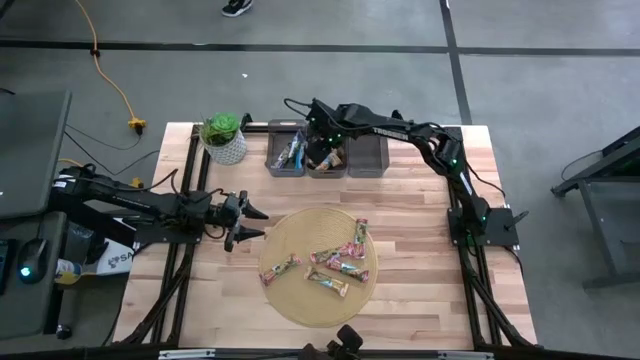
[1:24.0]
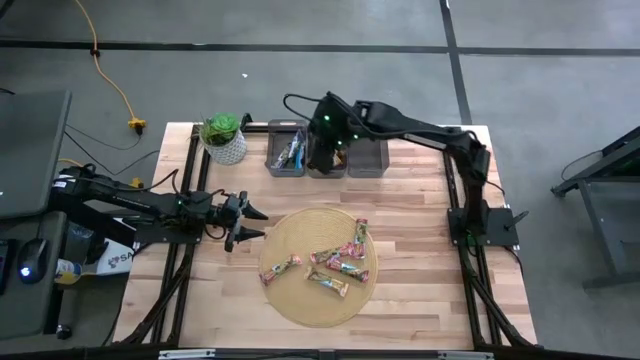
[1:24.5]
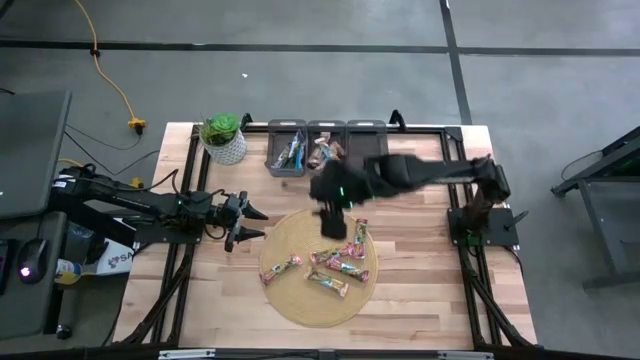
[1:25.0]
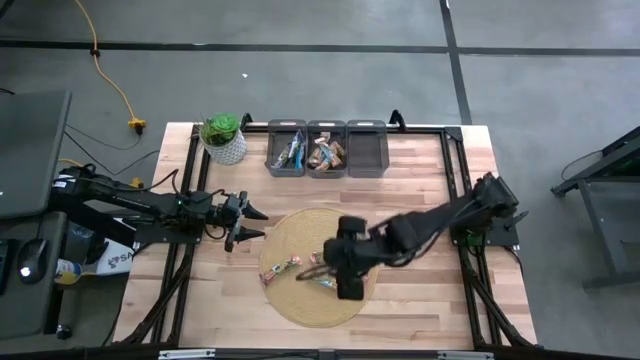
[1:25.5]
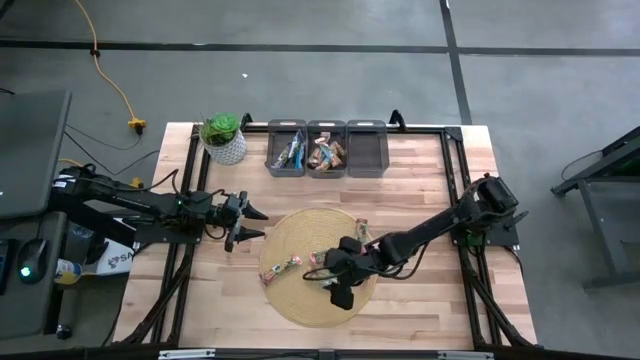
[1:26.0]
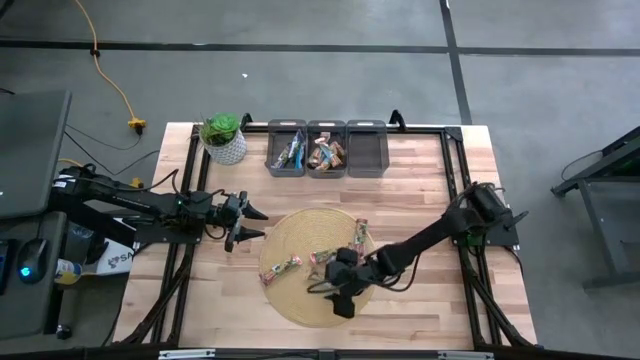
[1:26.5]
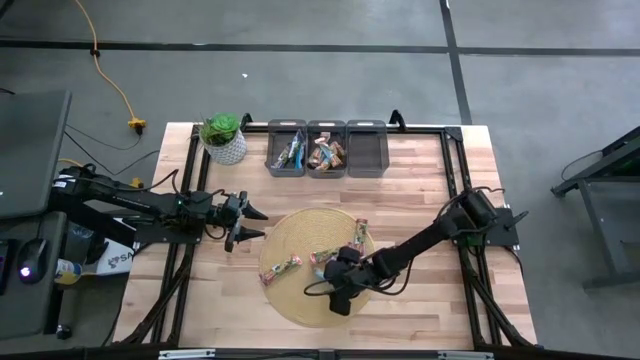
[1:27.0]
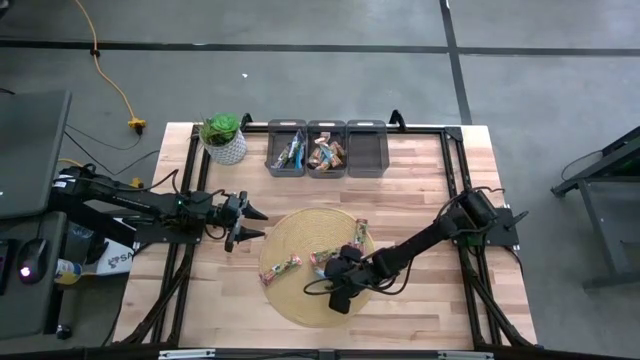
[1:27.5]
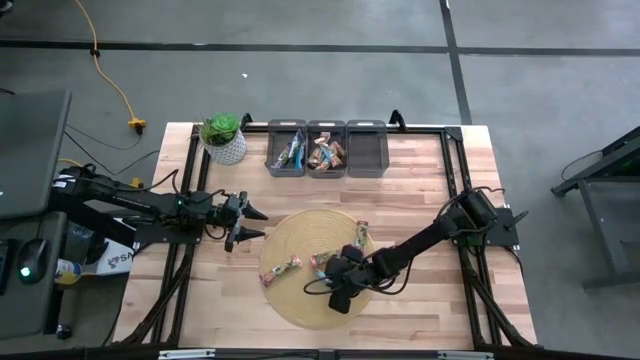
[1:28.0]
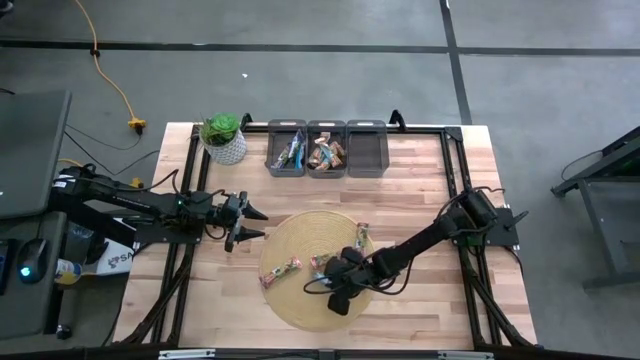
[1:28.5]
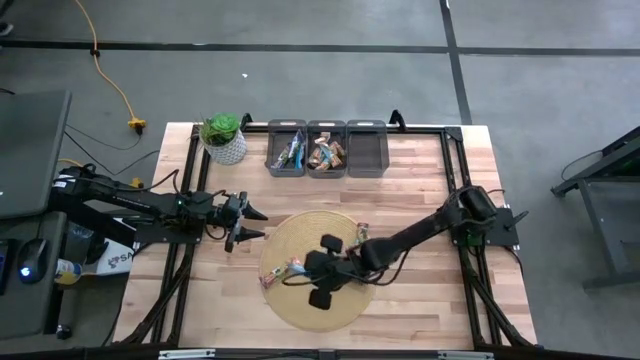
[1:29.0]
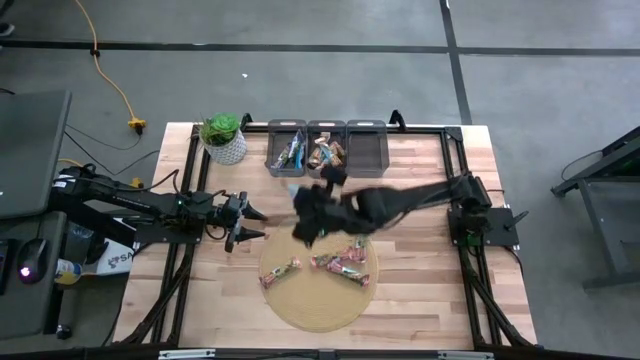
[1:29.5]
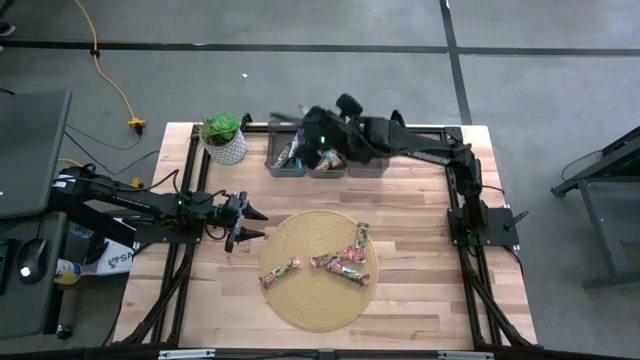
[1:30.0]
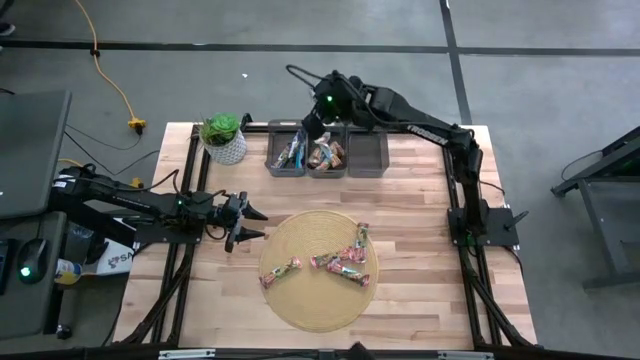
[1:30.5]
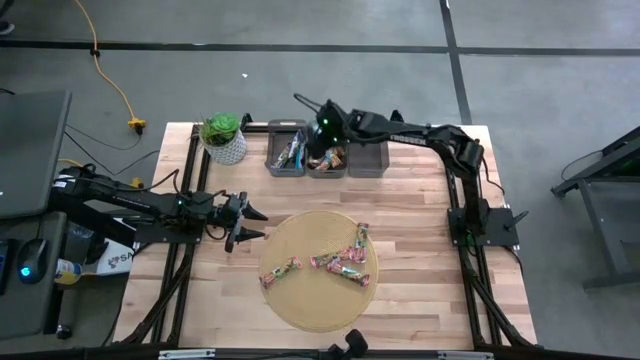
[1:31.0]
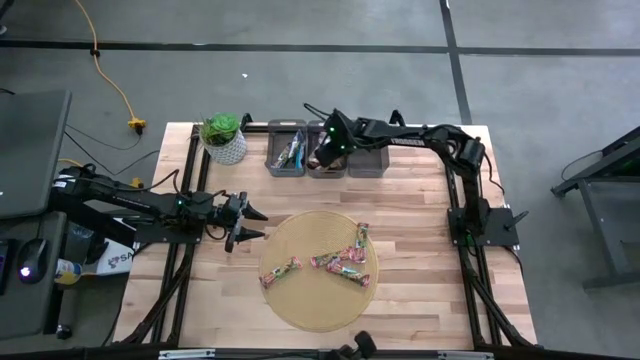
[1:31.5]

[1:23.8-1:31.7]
Task: Pick and place Granola Bars by type
Put the yellow granola bar into the middle black bin

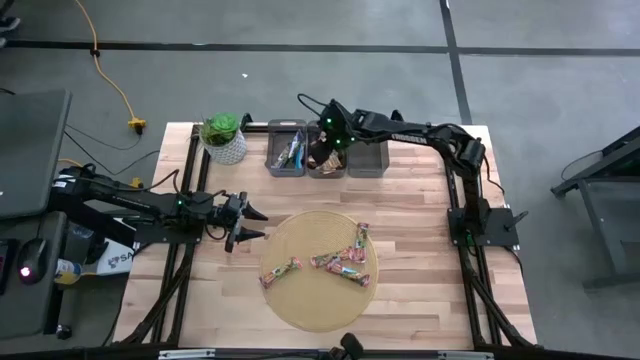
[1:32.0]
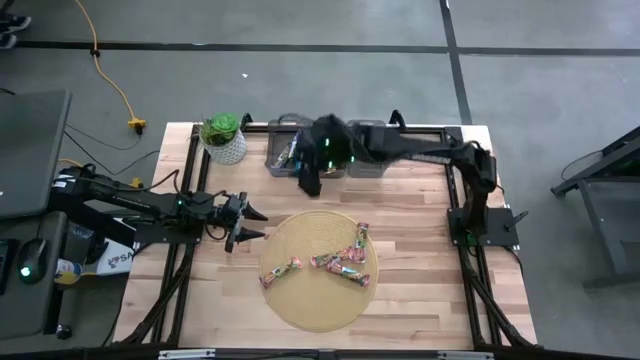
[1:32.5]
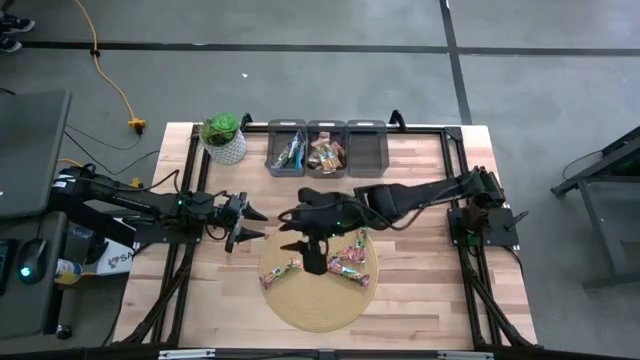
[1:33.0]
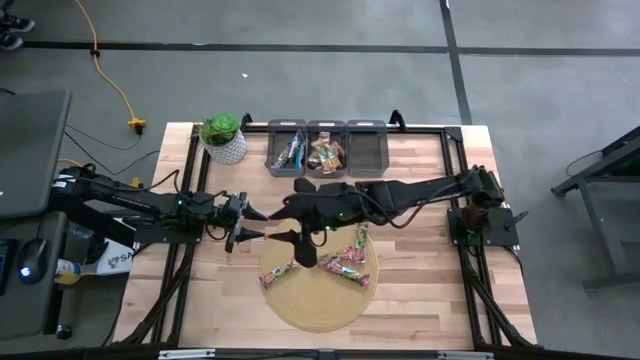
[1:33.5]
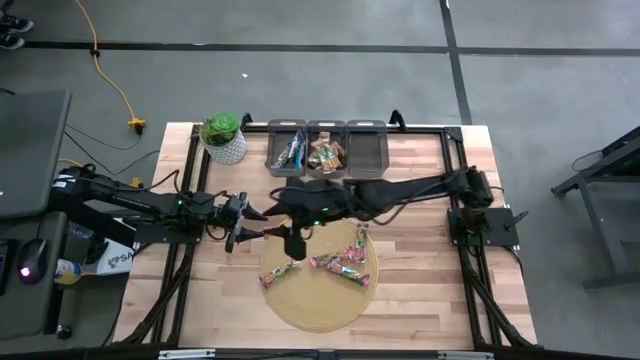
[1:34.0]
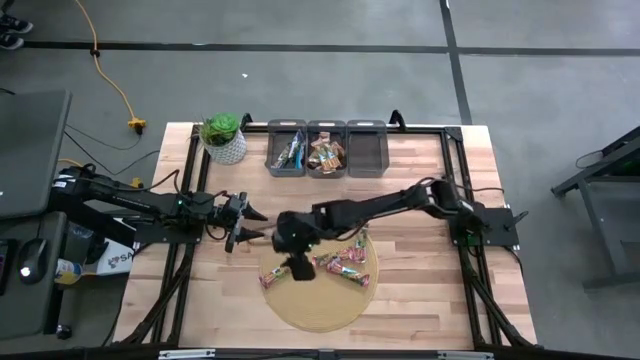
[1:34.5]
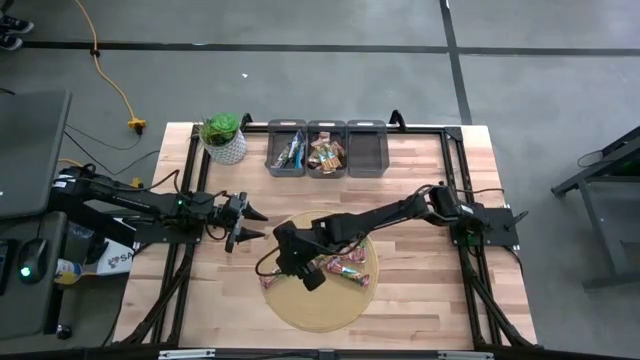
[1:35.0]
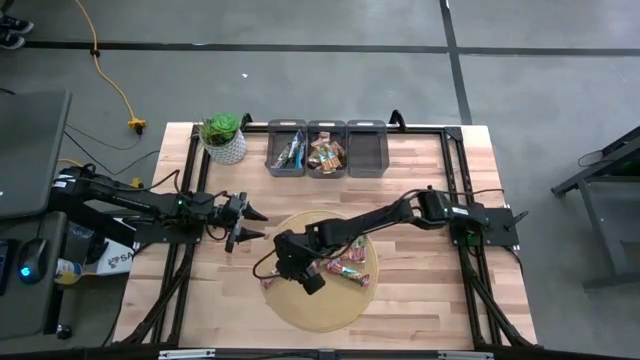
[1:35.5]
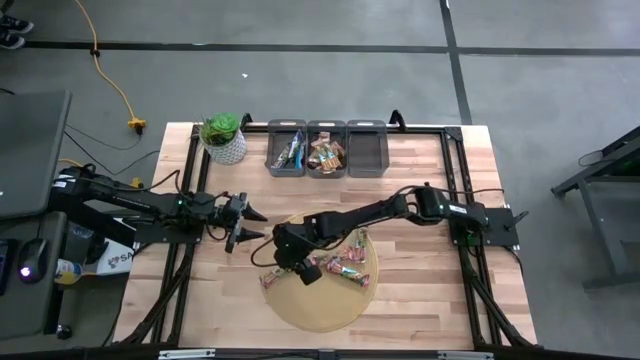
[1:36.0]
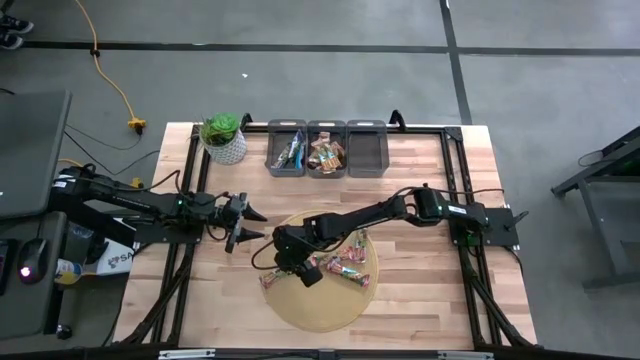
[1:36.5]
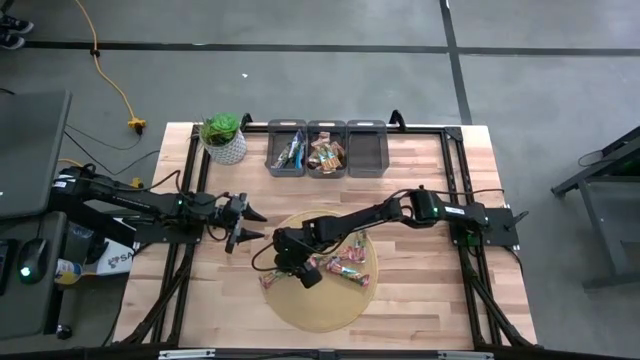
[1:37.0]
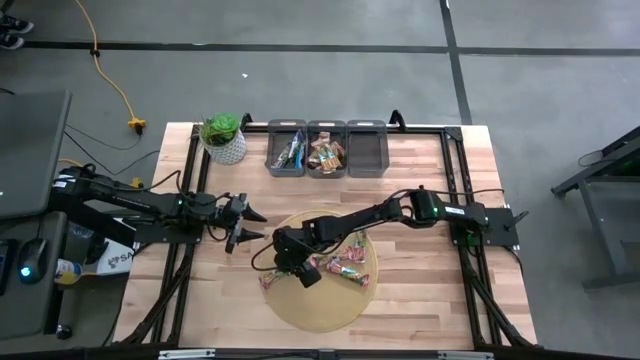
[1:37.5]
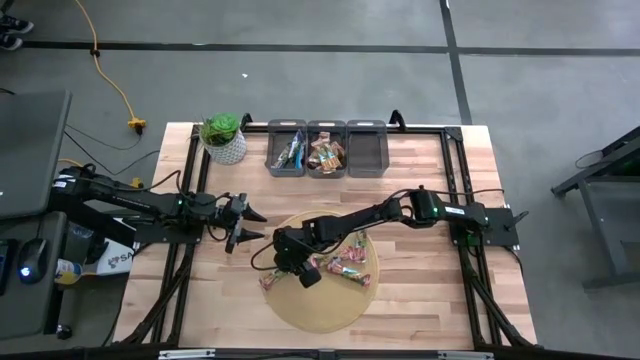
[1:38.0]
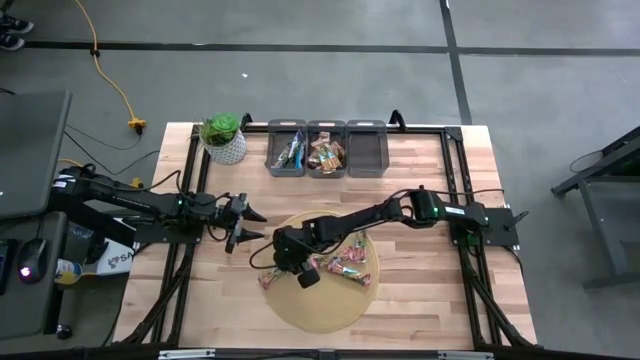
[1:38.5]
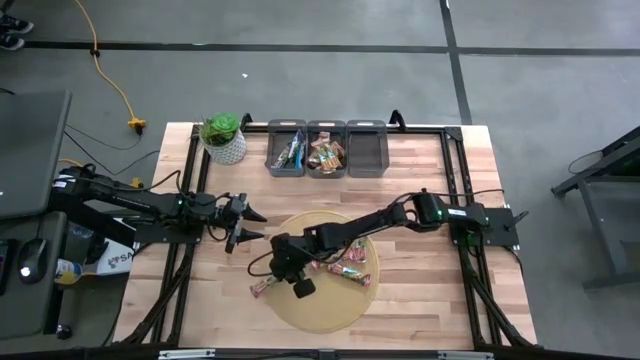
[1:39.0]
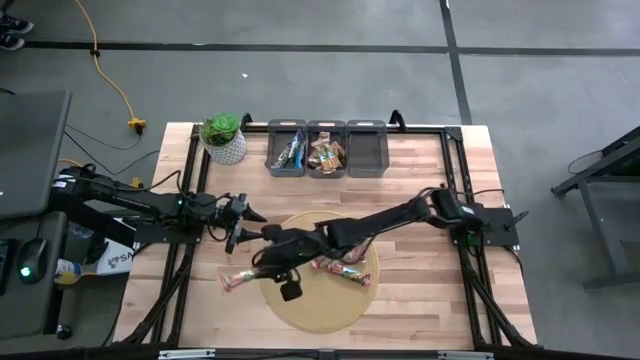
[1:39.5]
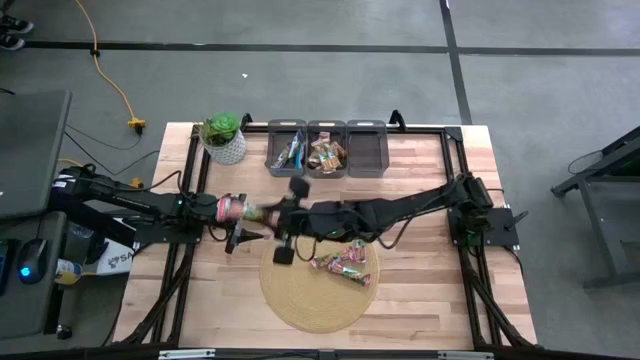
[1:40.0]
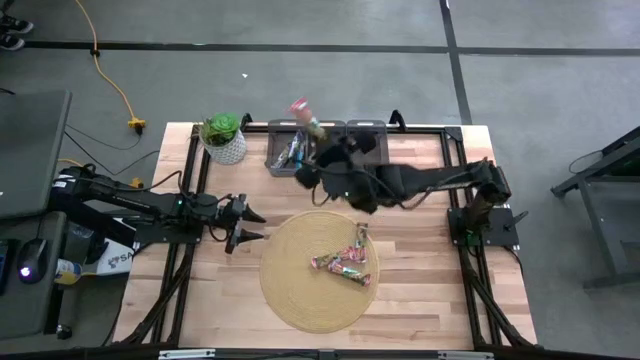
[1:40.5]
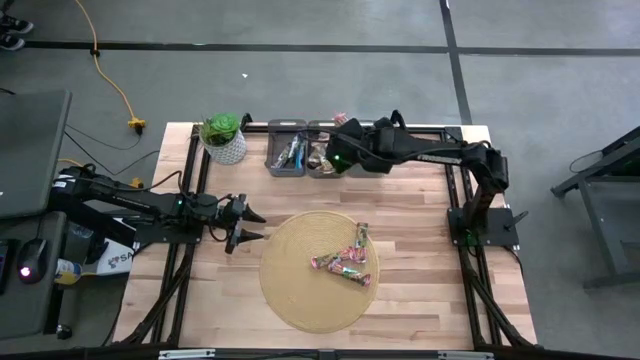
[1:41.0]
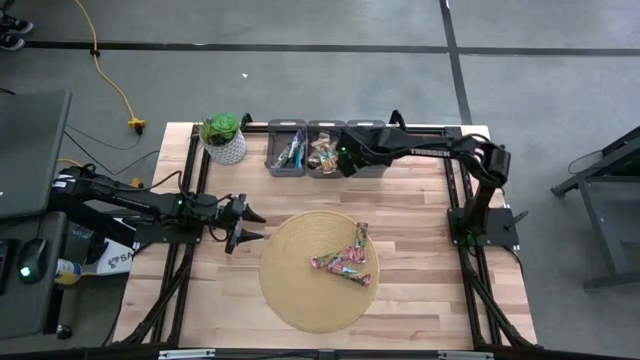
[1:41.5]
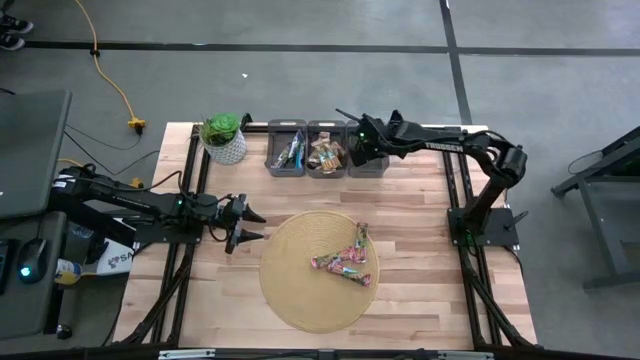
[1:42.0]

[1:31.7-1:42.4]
Put the red granola bar into the right black bin

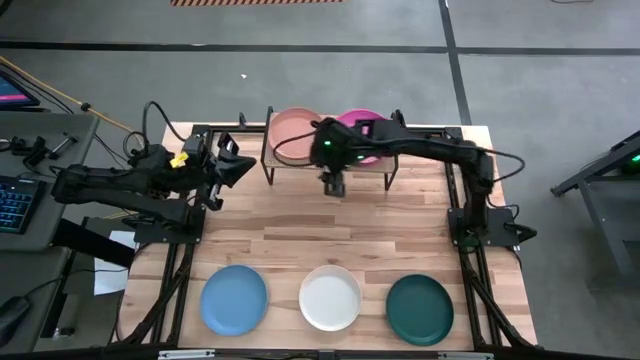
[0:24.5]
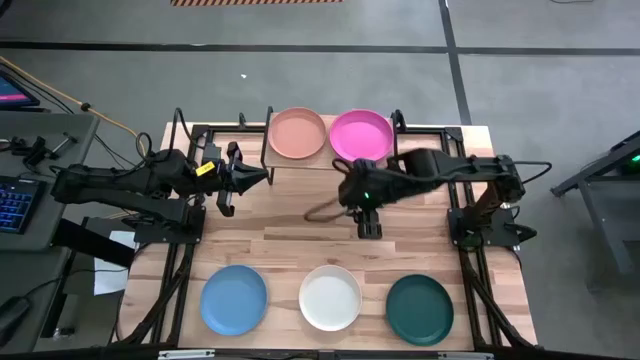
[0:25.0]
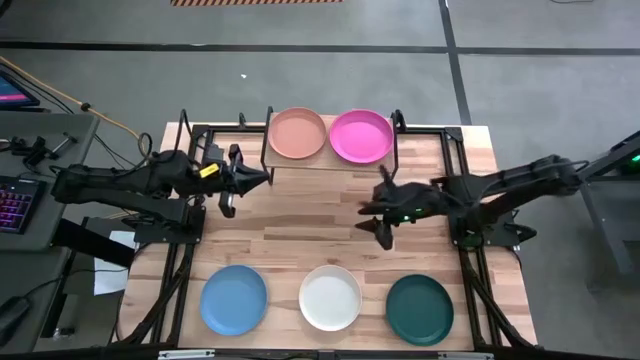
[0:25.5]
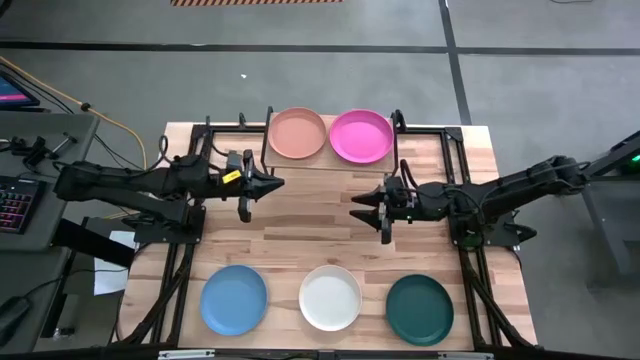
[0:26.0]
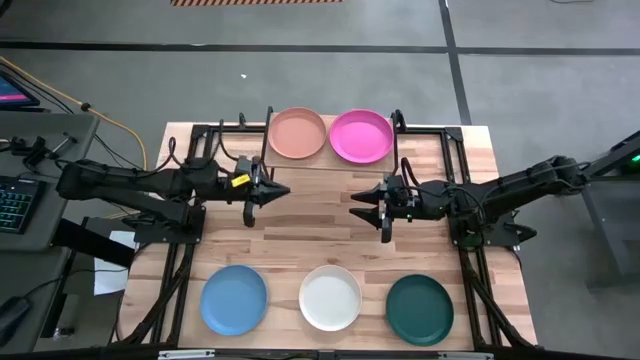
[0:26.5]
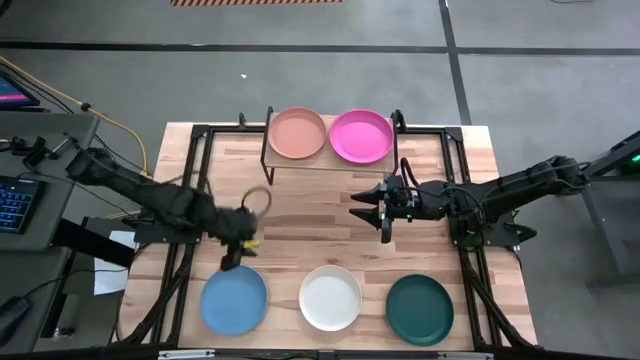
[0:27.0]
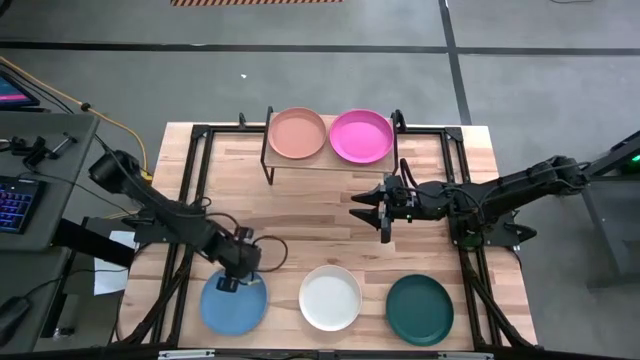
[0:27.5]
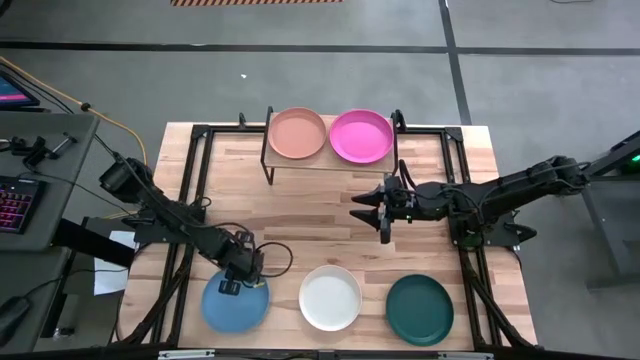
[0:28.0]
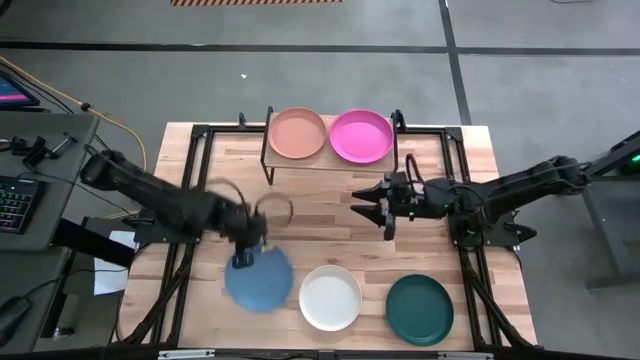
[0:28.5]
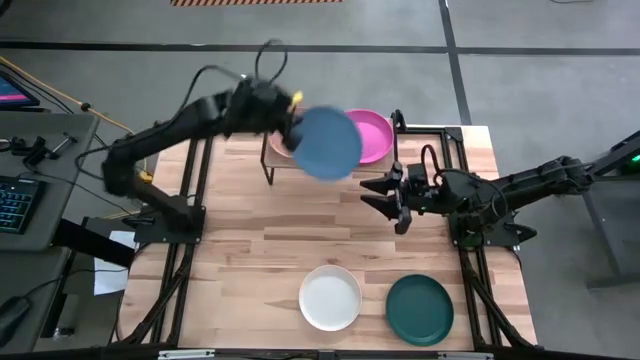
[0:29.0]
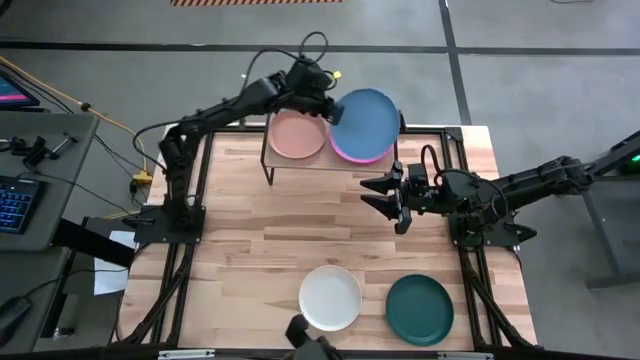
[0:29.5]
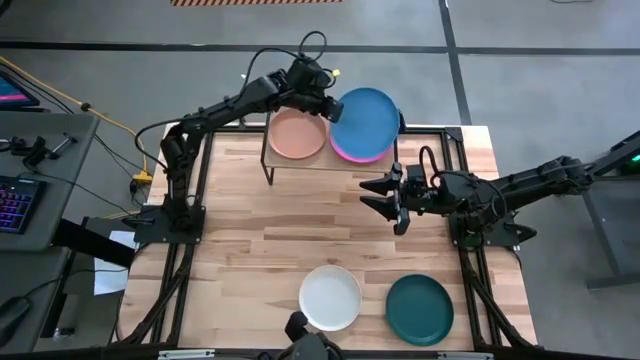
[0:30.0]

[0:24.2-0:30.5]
Task: Place and stack plates onto a shelf
Stack the blue plate on the pink plate
